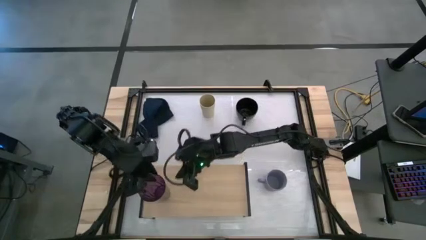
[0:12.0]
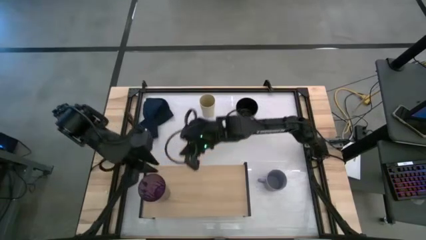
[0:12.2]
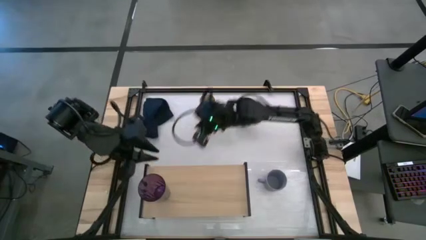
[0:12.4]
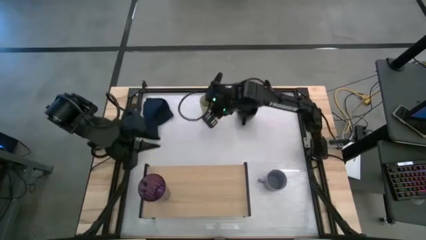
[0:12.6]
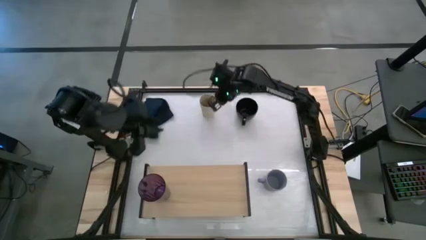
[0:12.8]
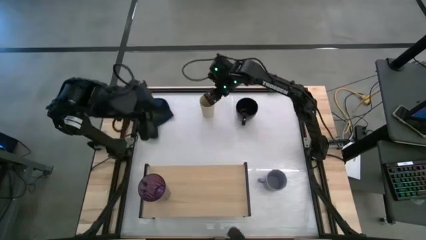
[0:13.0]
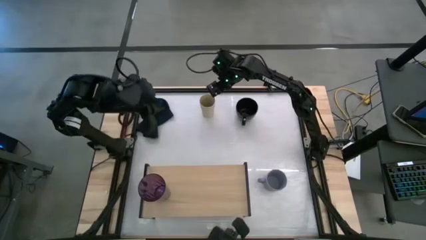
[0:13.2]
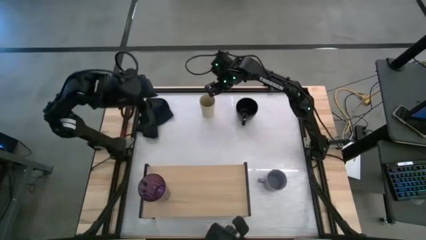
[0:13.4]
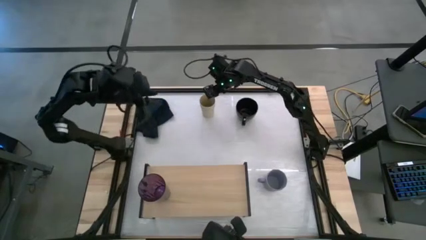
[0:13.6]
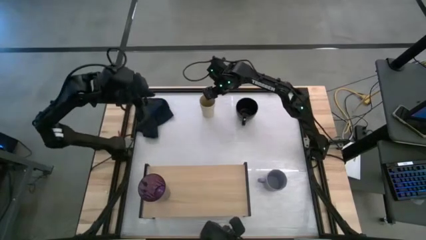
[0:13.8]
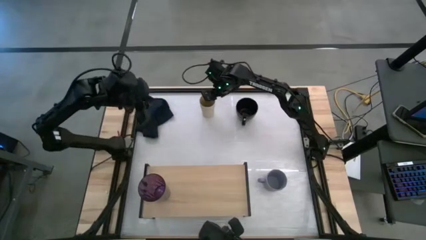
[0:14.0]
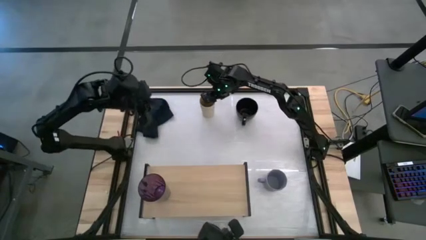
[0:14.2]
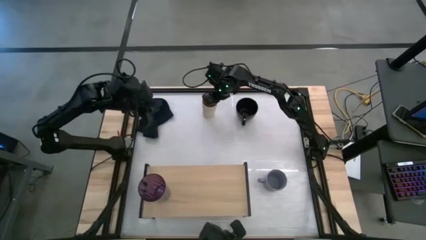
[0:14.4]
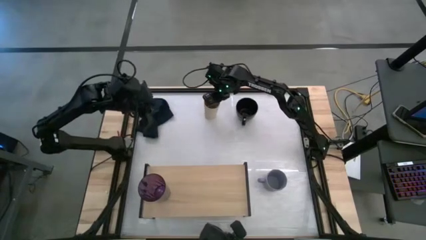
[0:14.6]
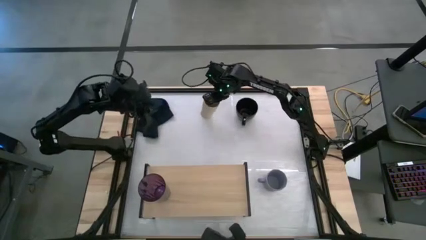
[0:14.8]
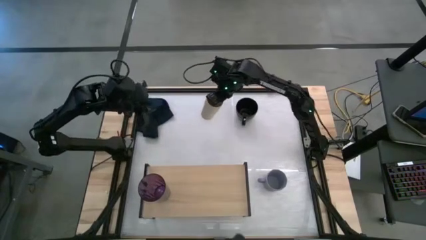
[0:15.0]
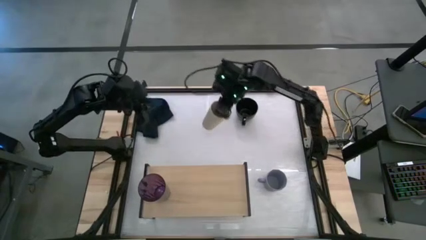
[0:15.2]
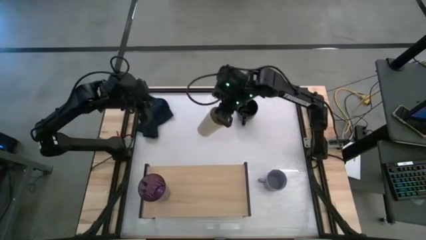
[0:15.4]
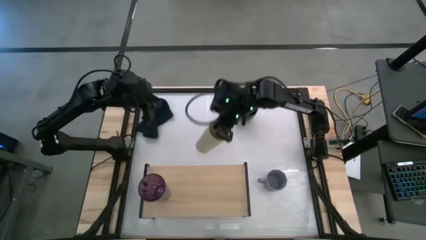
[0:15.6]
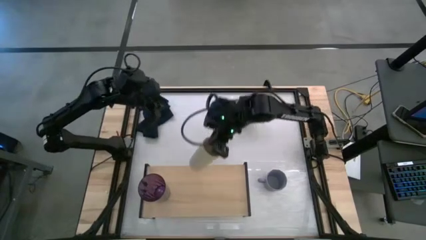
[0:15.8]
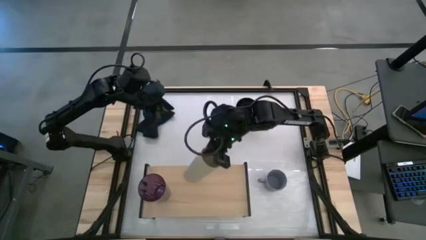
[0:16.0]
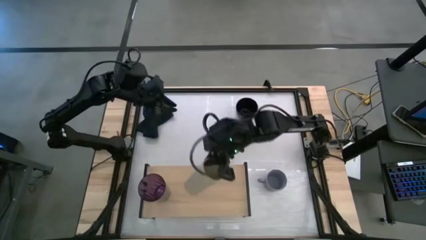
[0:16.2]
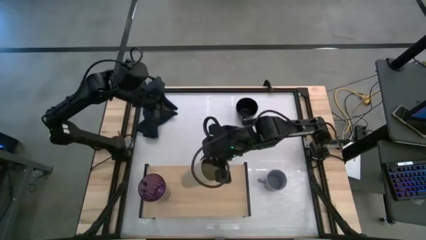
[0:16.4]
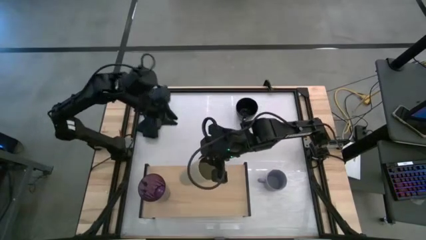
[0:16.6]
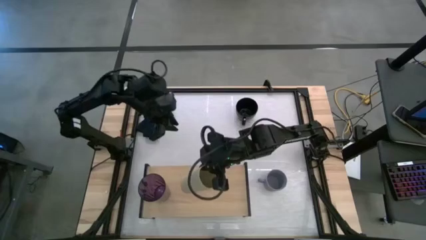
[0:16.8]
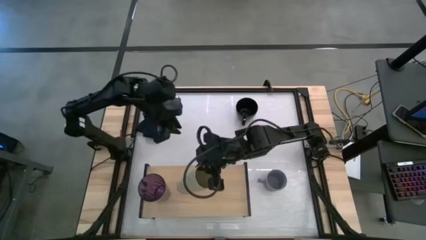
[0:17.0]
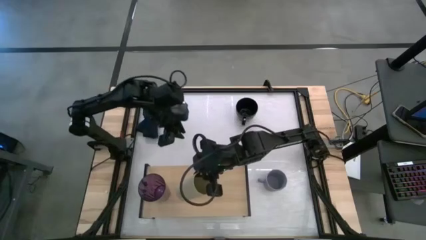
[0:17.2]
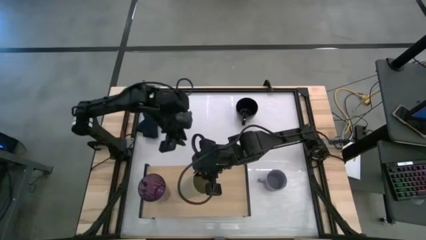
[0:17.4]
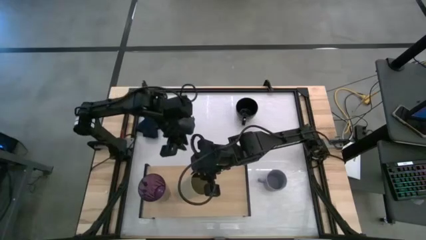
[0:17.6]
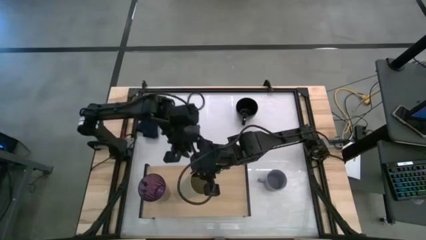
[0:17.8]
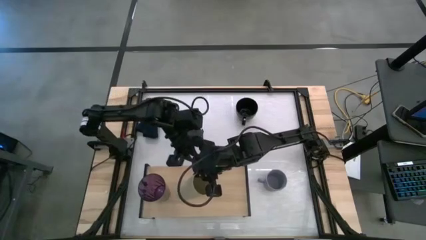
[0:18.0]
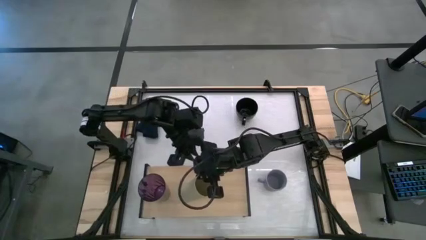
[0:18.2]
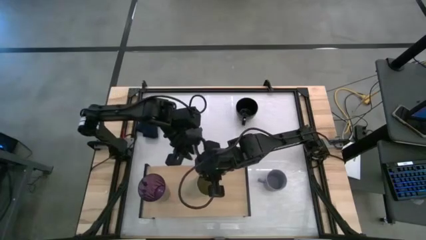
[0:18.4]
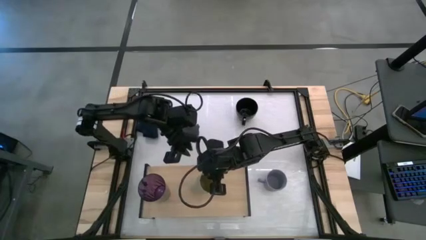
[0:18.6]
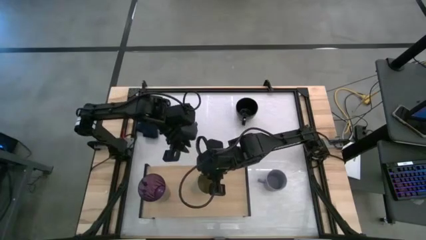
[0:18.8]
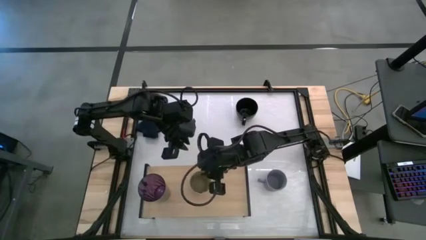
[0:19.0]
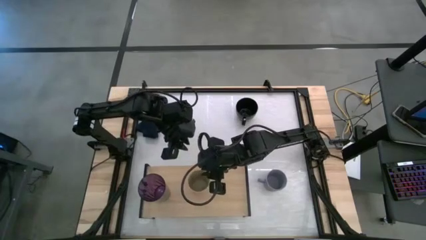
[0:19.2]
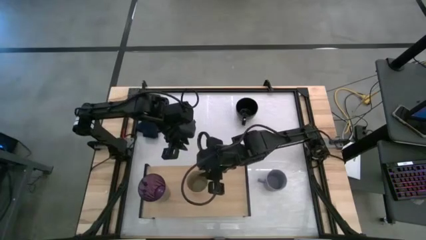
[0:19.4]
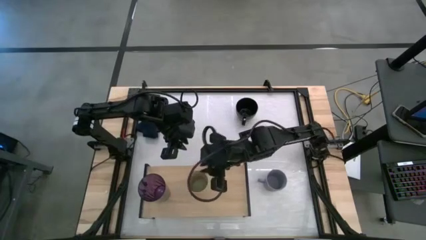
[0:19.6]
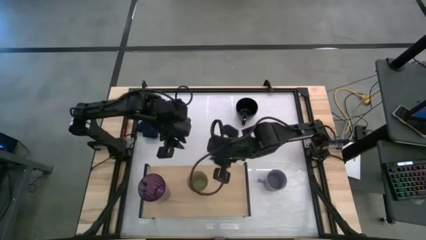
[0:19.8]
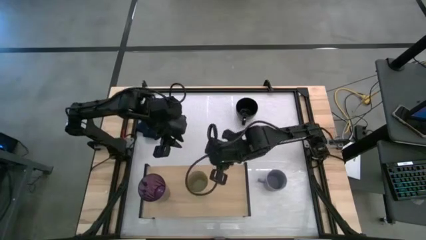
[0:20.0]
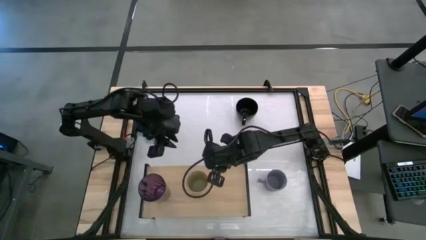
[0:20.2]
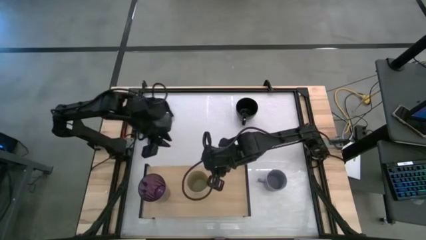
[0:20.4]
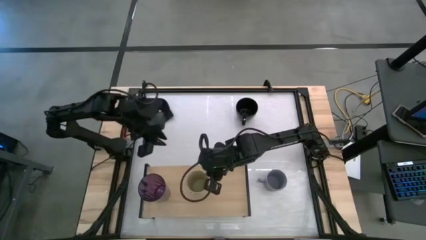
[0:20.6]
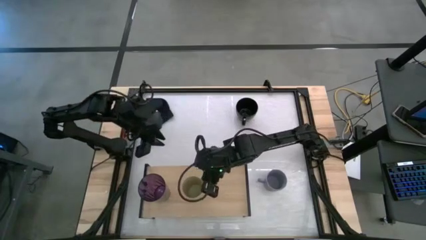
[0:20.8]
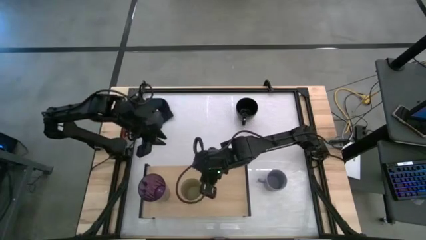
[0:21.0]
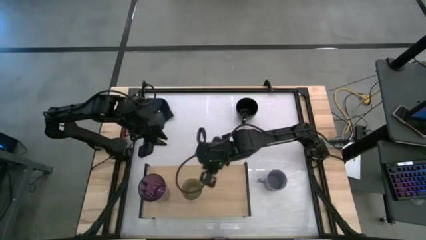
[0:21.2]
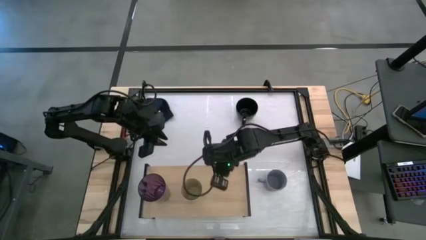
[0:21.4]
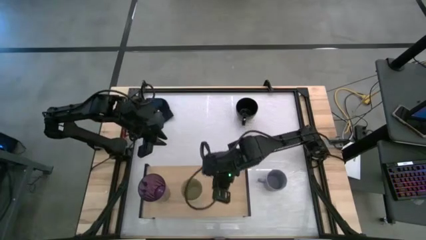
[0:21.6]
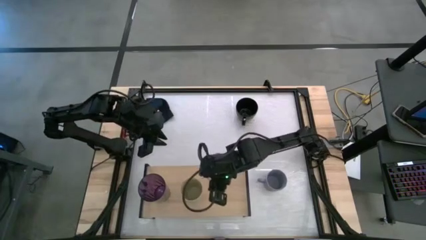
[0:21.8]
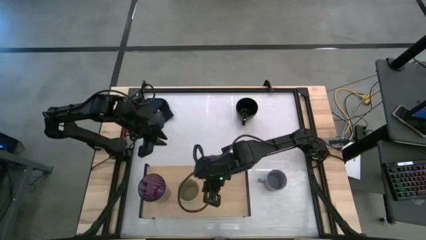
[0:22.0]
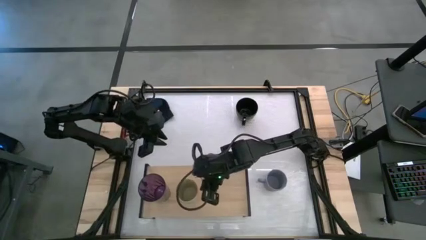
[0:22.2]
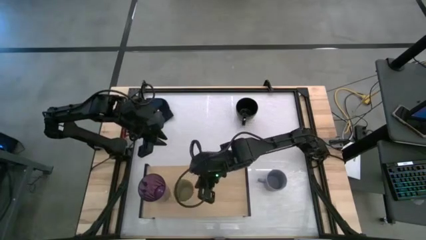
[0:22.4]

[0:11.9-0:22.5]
Task: Stack small to large cups/mugs on shelf
Put the yellow cup on the shelf

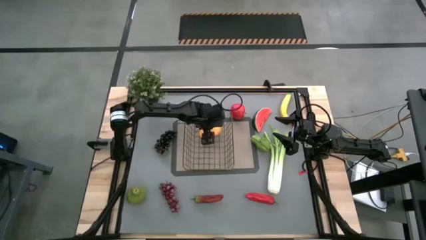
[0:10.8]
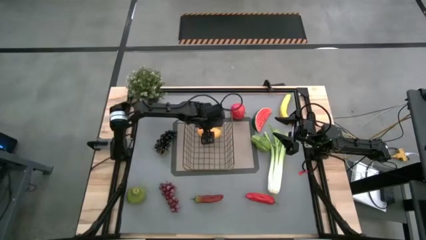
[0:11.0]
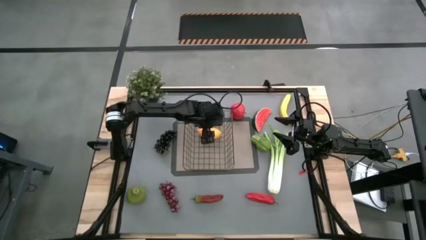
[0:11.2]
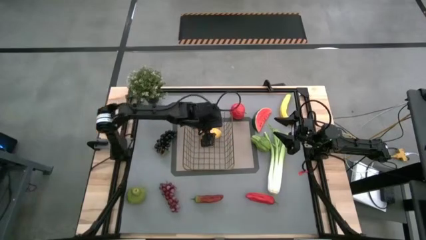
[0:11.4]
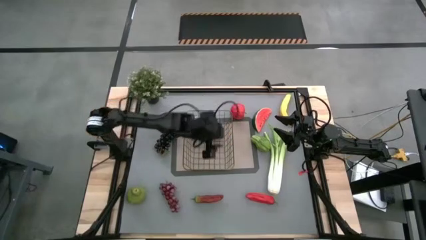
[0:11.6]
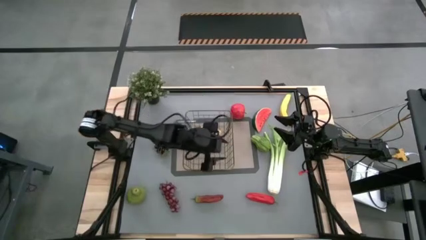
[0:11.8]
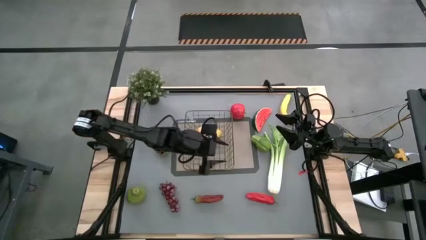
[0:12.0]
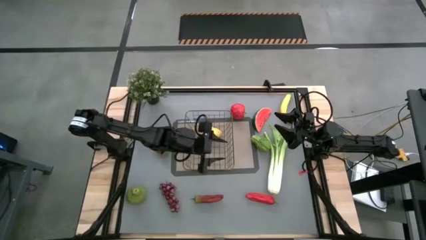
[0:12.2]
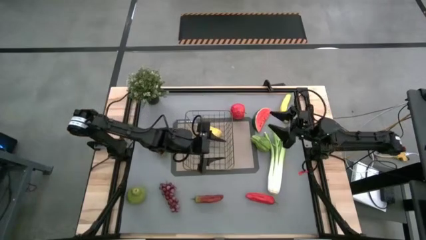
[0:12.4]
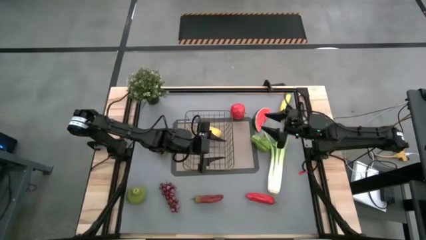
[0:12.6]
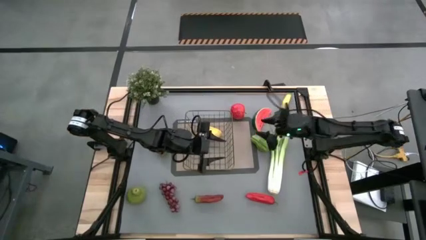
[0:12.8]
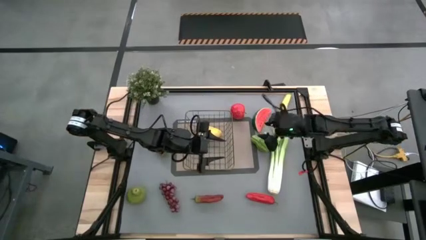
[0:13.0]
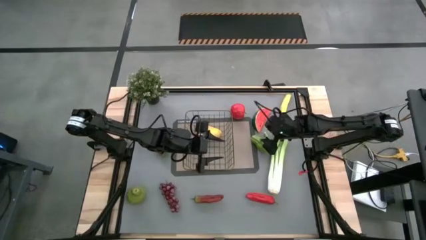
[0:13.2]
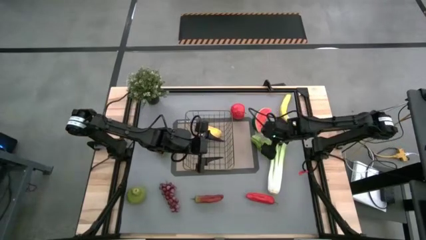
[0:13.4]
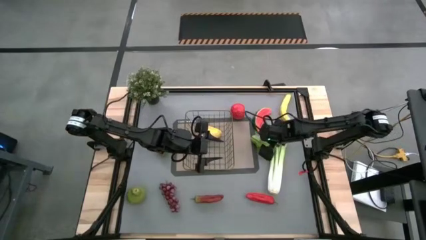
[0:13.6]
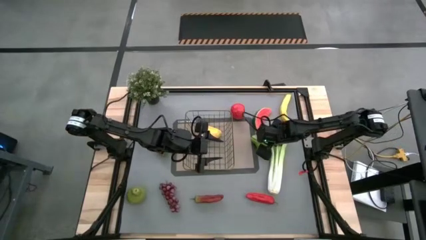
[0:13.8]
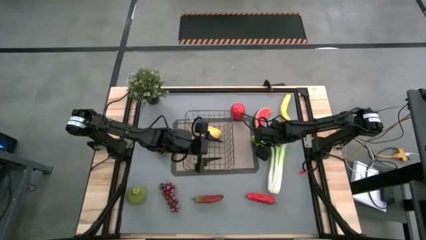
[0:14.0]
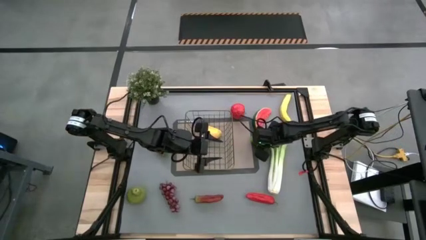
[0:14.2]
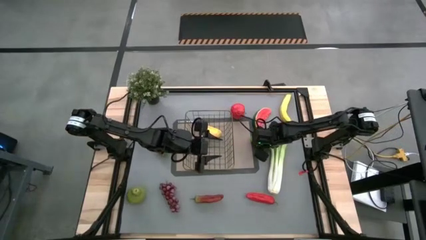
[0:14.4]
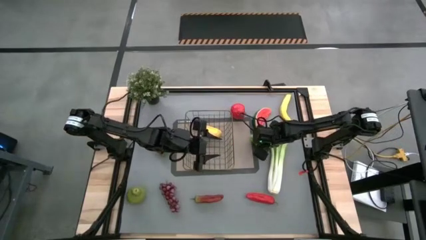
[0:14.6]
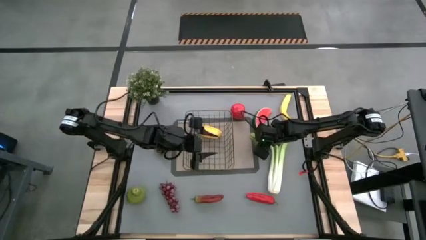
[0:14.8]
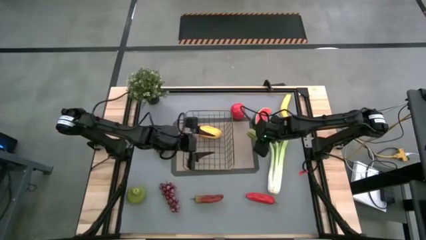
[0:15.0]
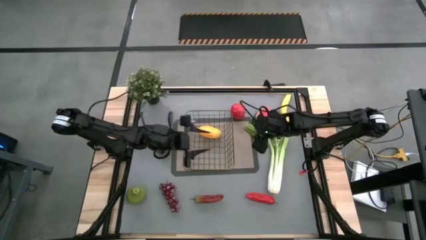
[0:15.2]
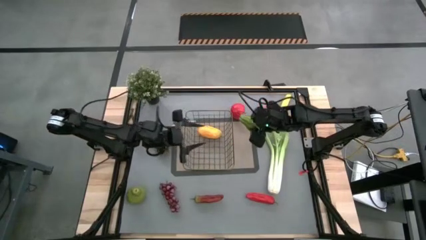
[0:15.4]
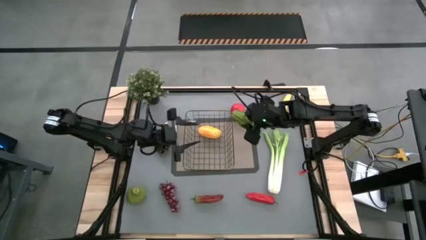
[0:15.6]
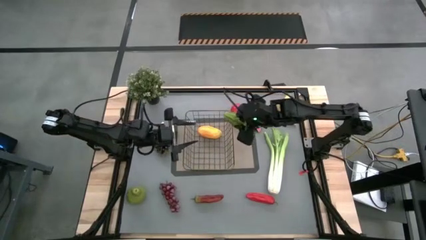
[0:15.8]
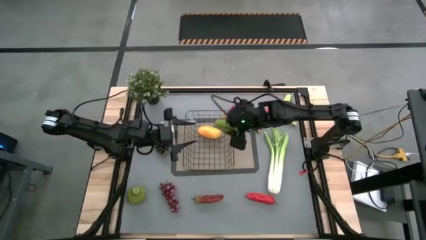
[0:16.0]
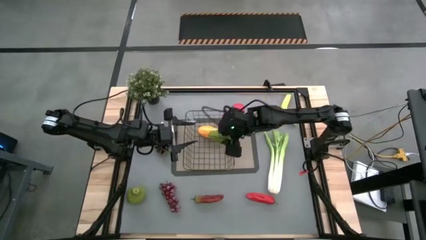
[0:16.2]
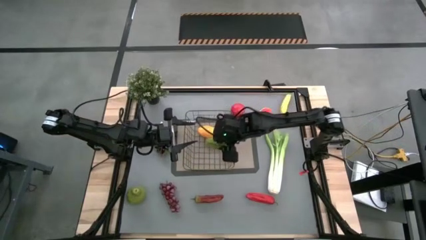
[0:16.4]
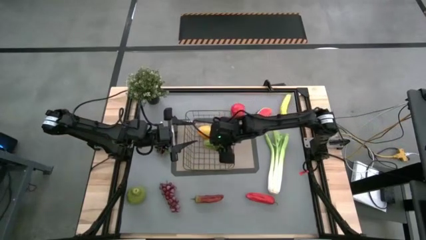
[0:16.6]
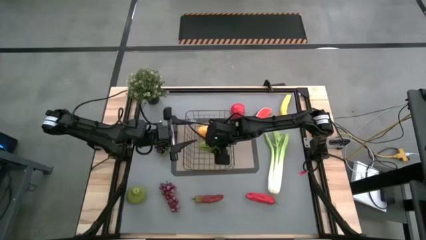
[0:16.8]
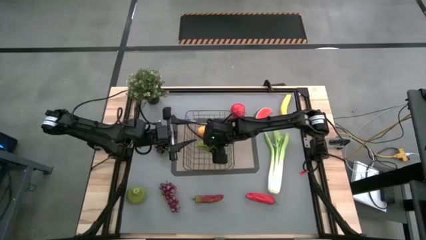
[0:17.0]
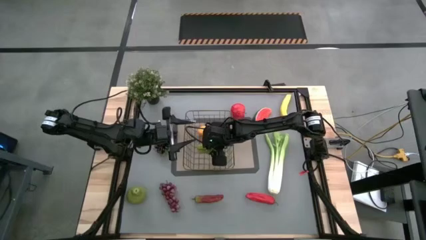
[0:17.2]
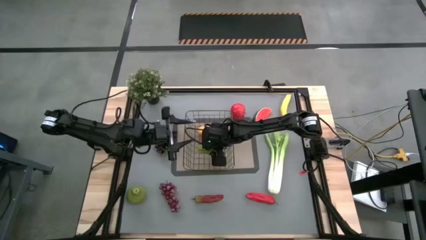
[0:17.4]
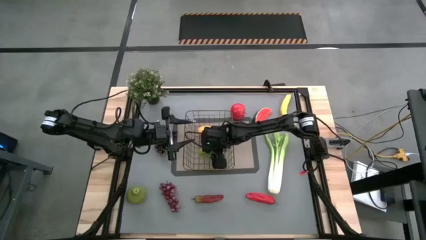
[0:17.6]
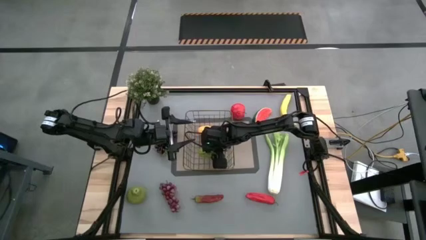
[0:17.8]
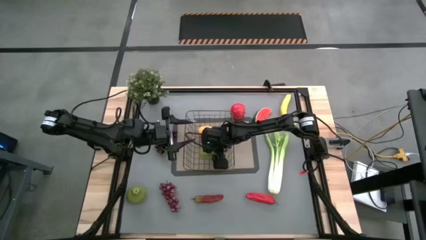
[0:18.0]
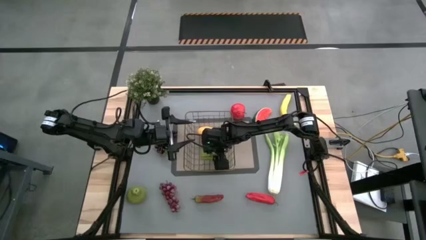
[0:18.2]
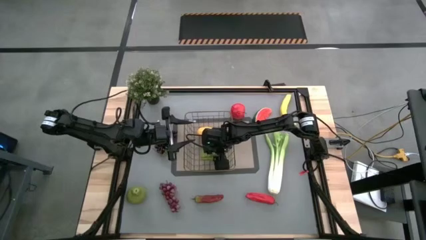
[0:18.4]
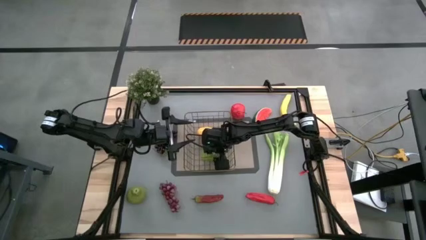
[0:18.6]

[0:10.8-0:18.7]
Task: Build produce basket
Put the green chayote into the wire basket
